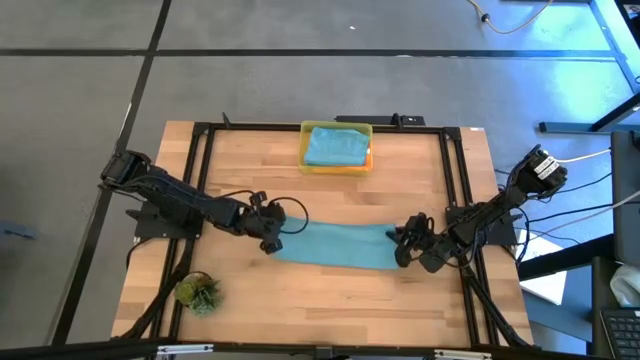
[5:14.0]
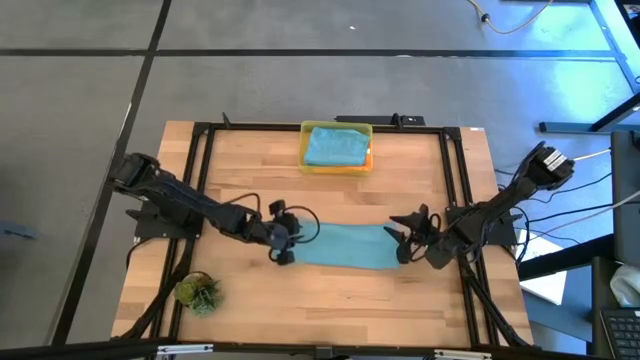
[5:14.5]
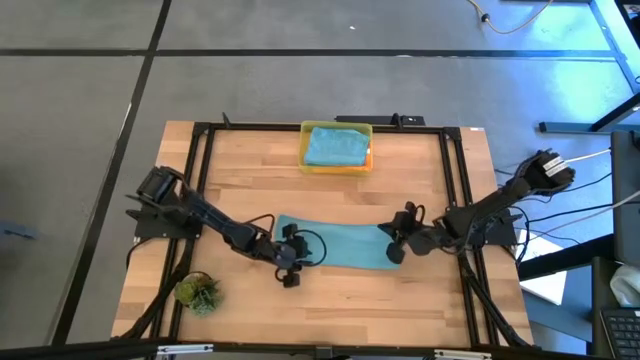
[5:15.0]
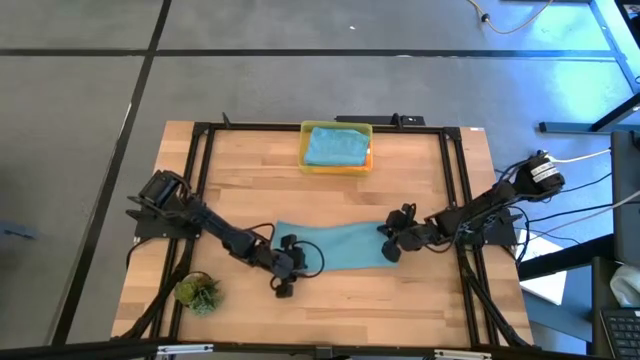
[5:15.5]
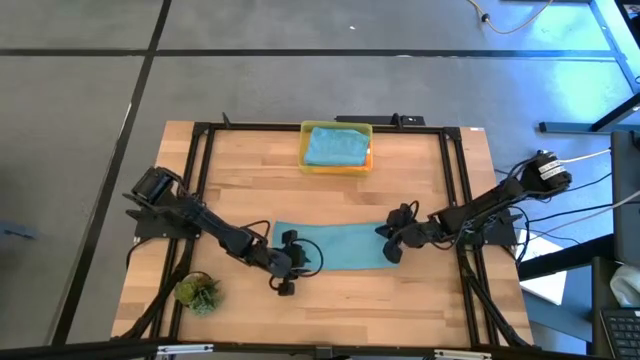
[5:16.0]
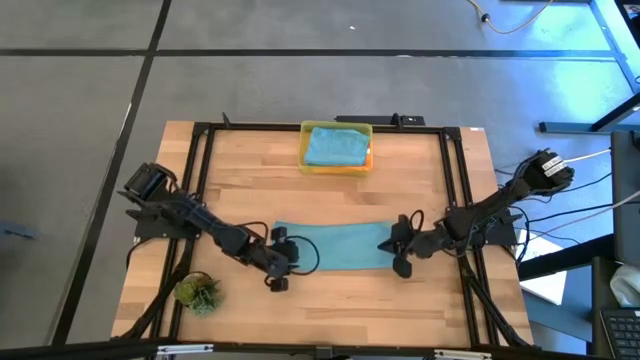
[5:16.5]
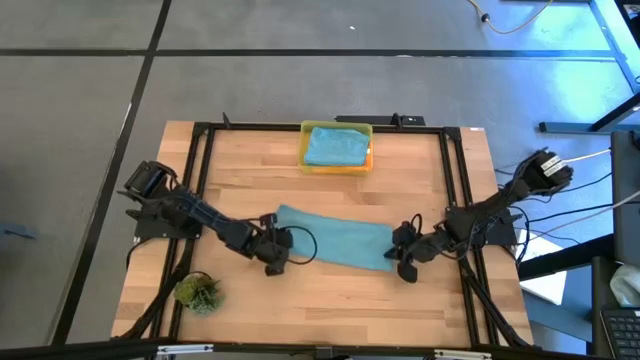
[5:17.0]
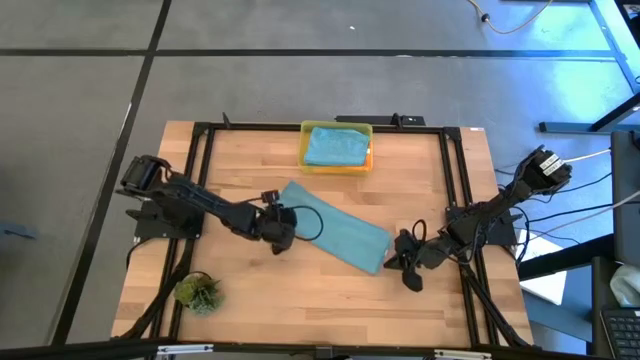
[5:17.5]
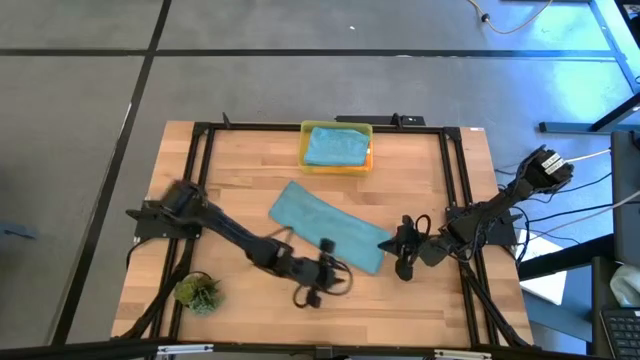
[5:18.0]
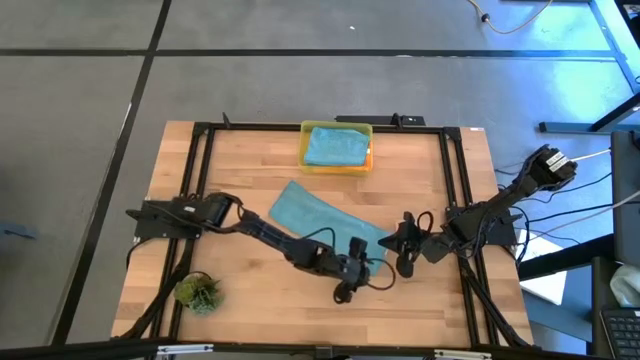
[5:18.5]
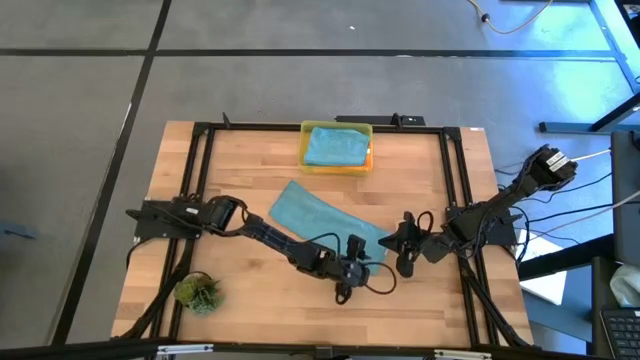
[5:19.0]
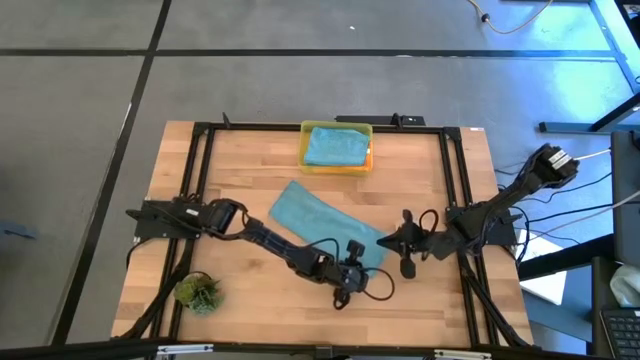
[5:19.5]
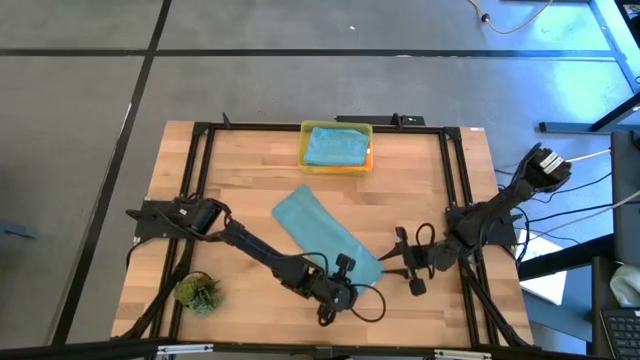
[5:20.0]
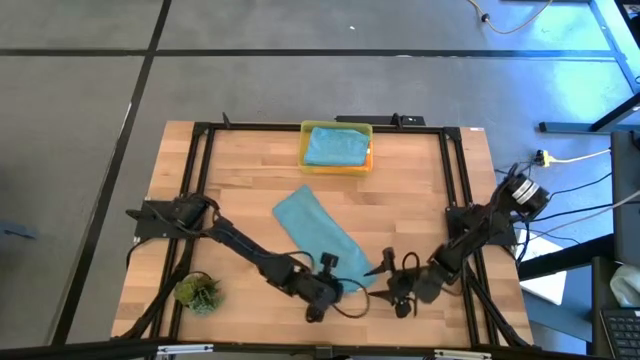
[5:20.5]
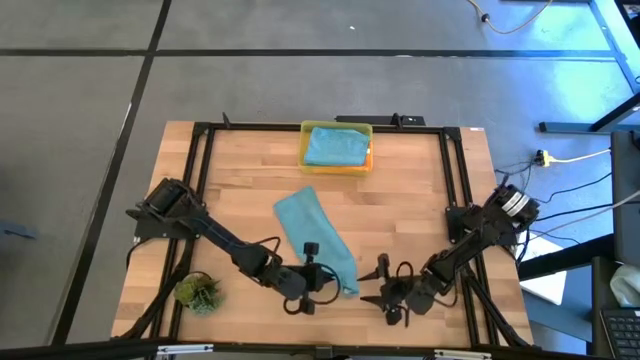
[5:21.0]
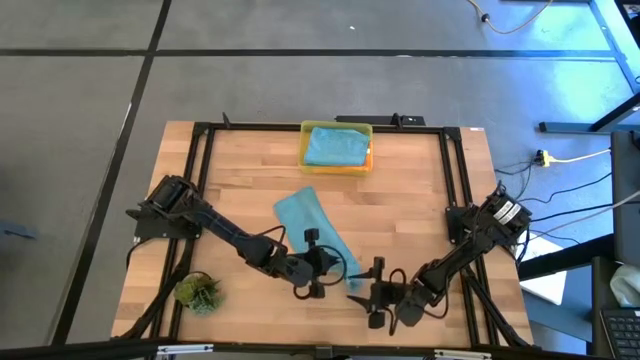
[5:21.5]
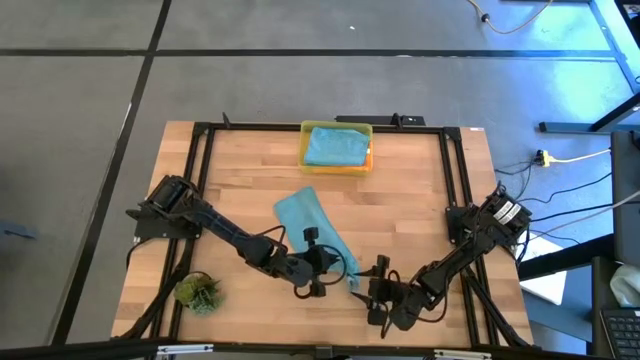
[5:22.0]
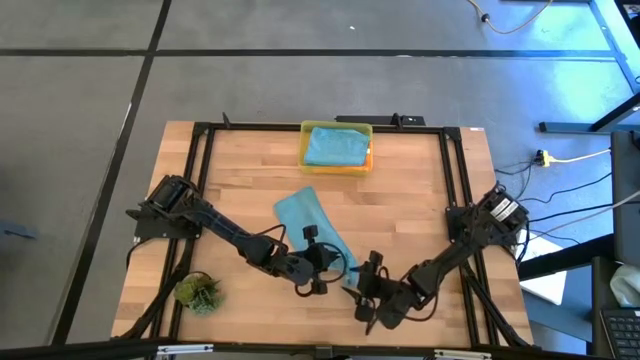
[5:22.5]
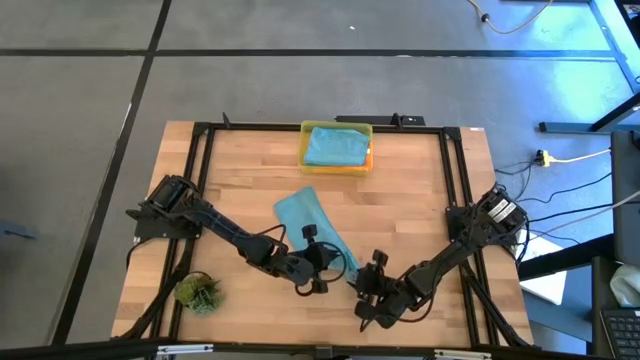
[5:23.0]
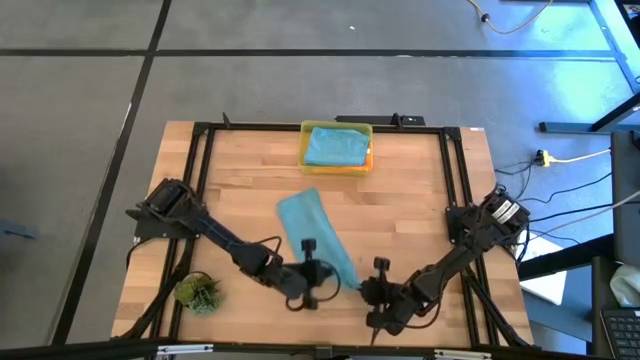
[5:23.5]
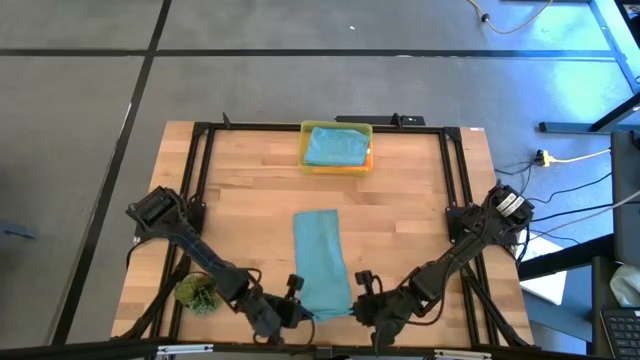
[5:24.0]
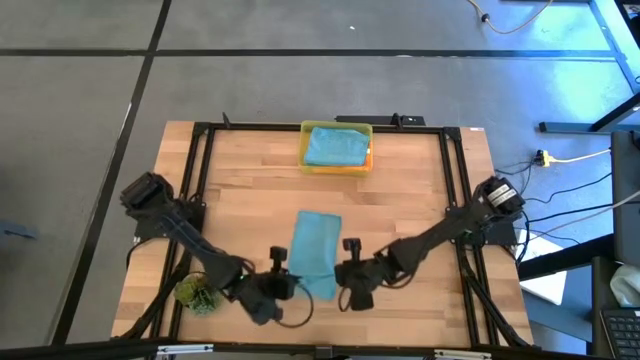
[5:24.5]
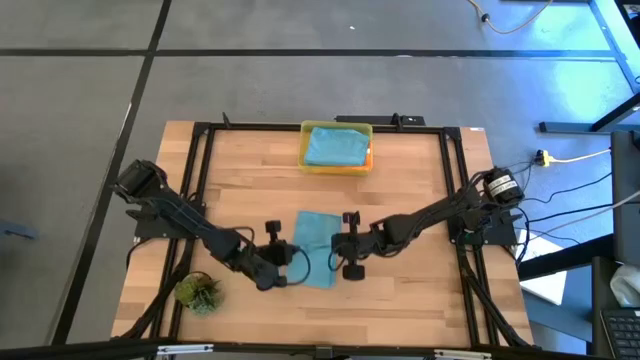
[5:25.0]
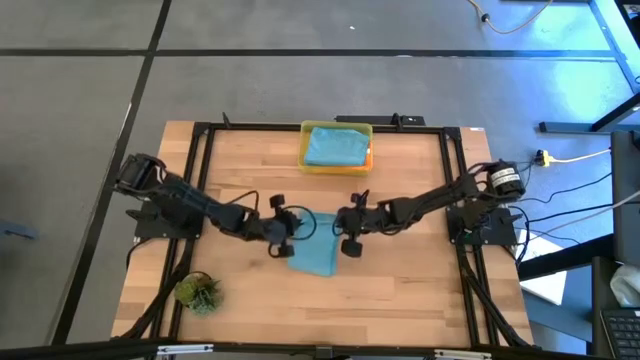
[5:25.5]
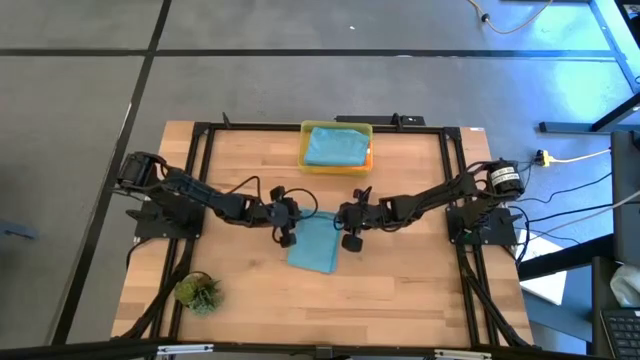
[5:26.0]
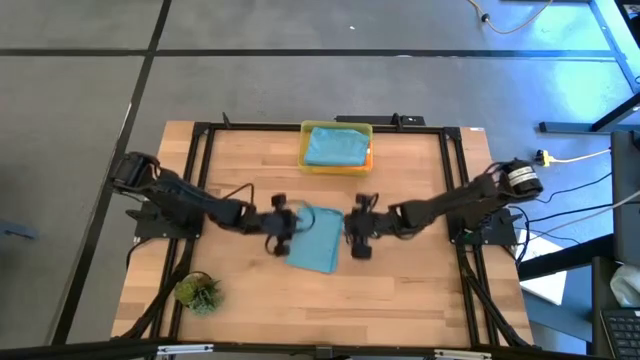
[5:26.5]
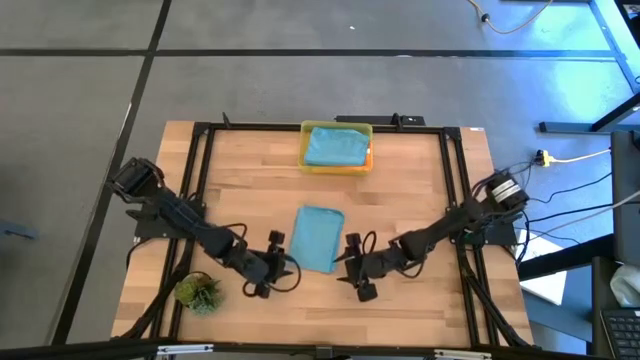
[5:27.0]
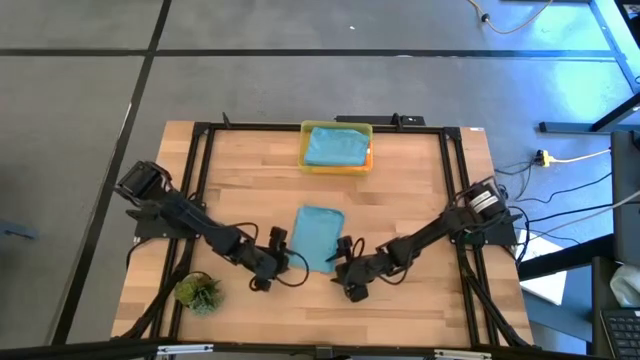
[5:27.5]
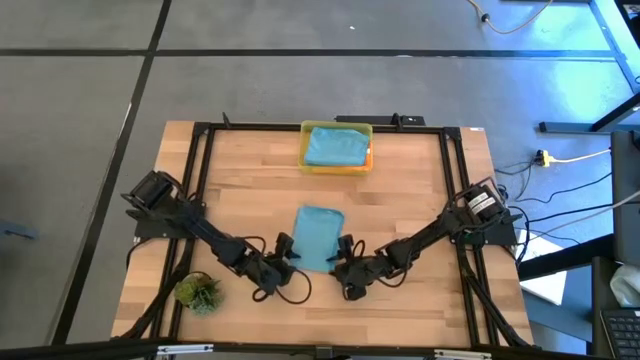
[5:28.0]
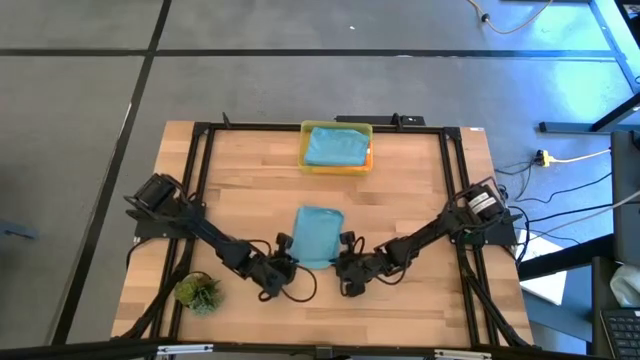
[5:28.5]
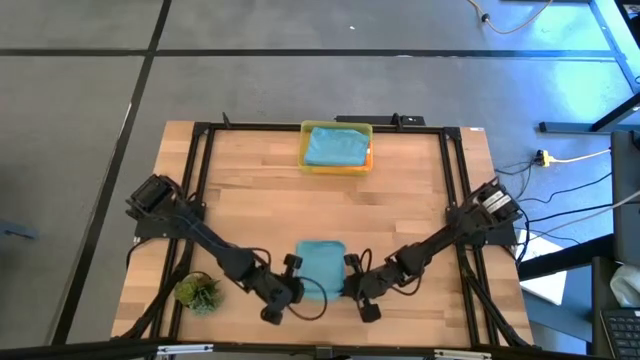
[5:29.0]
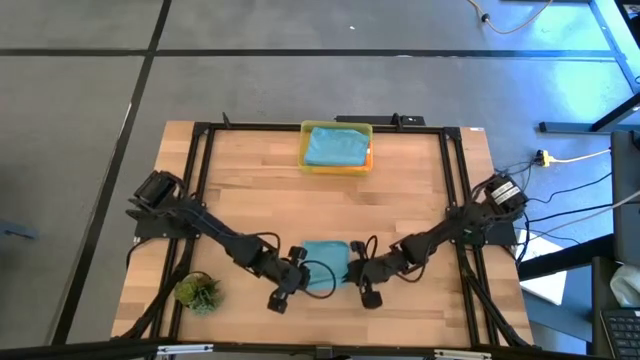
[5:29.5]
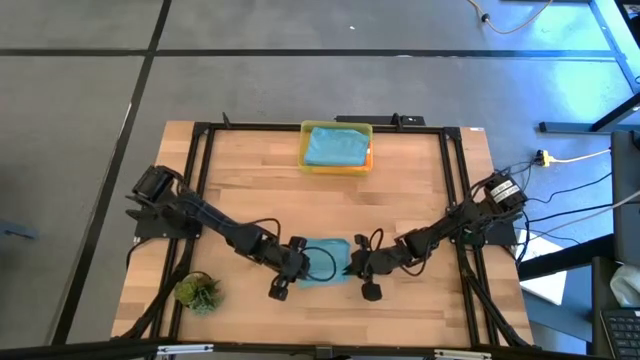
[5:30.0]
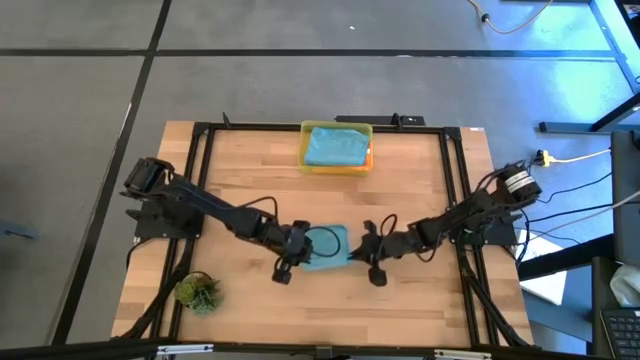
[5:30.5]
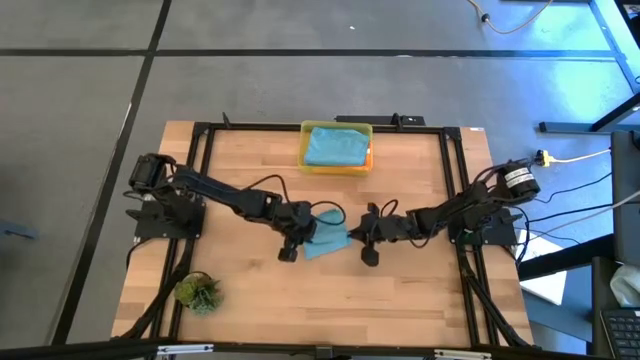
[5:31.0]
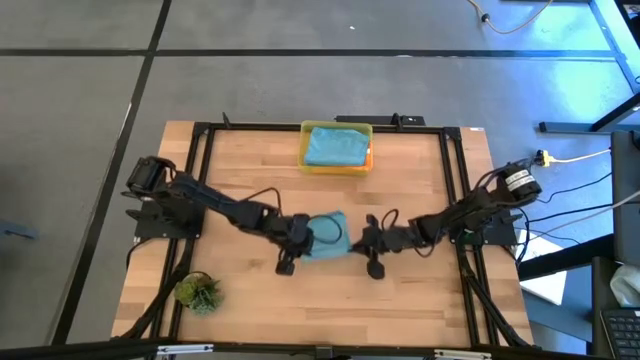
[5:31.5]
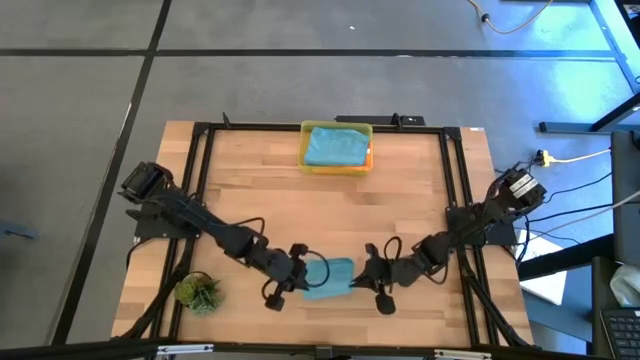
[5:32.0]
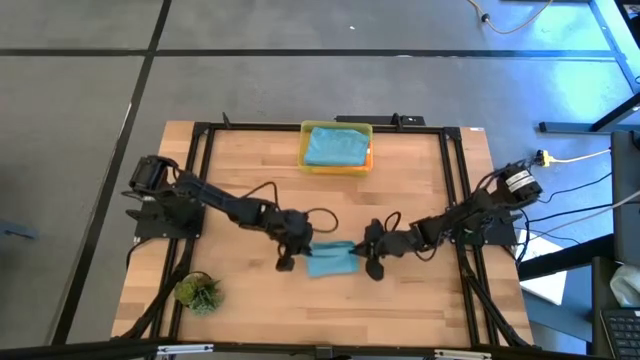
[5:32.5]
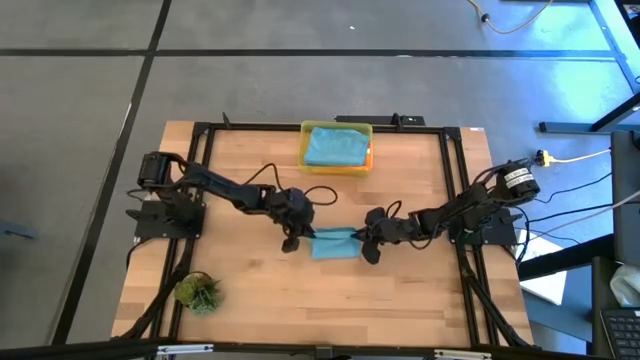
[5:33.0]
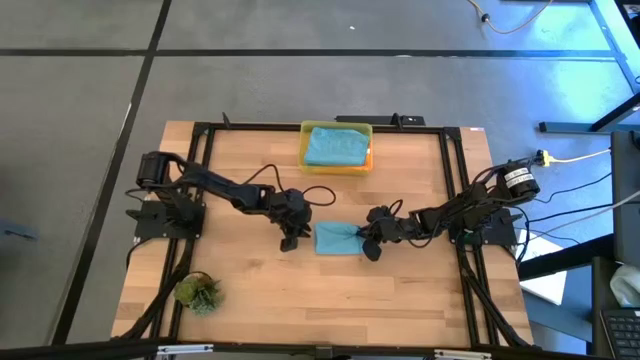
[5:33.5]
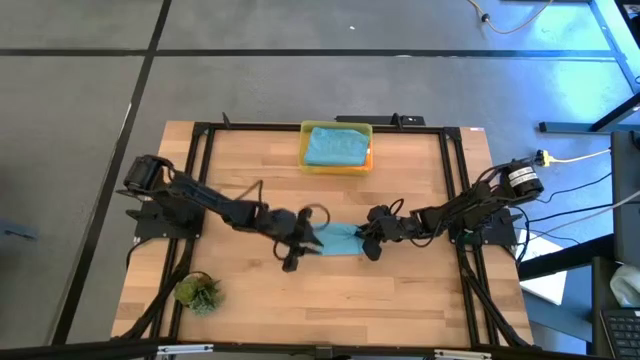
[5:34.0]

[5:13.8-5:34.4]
Task: Fold microfiber towels
Fold the blue microfiber cloth
